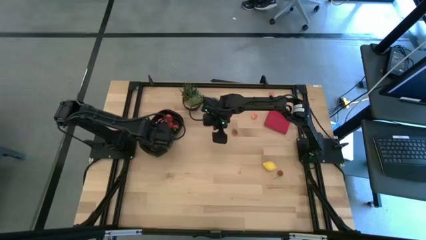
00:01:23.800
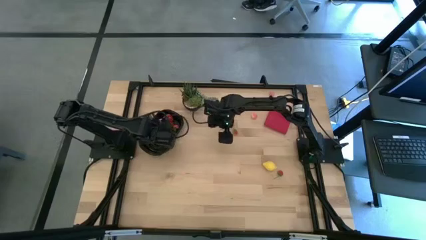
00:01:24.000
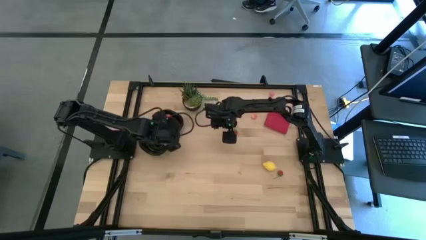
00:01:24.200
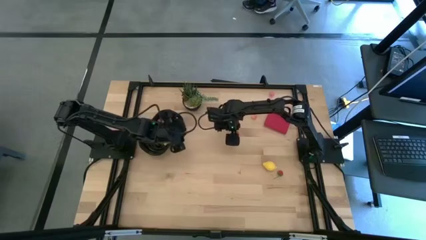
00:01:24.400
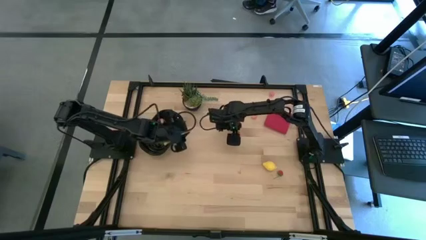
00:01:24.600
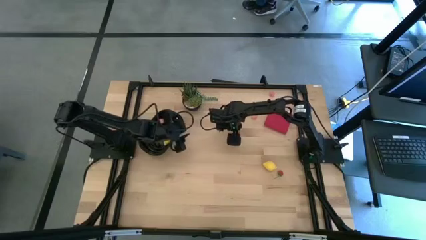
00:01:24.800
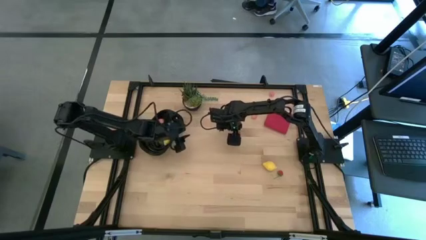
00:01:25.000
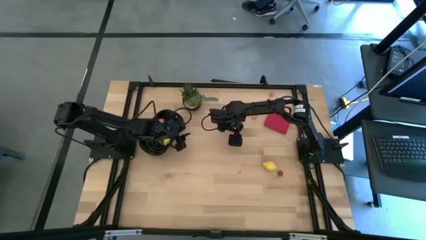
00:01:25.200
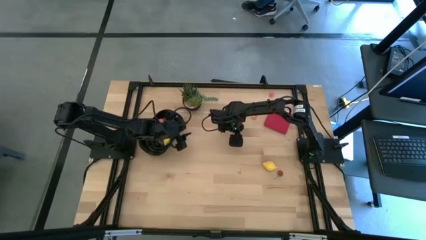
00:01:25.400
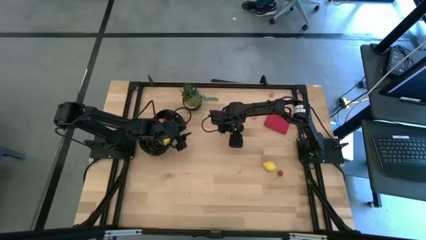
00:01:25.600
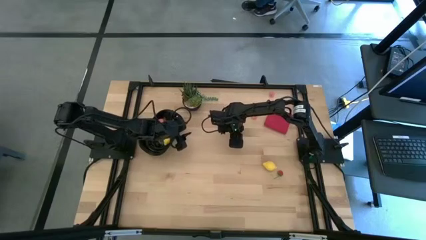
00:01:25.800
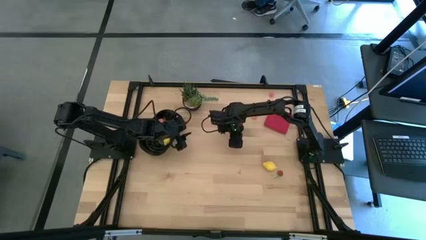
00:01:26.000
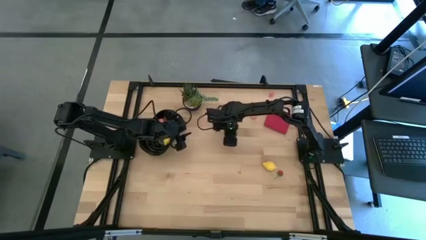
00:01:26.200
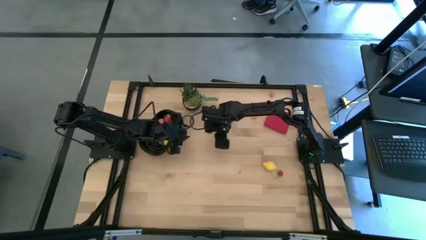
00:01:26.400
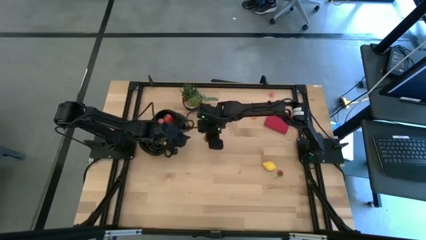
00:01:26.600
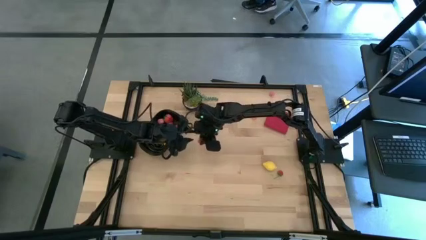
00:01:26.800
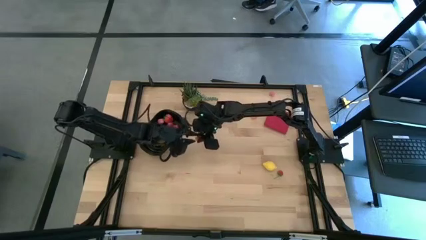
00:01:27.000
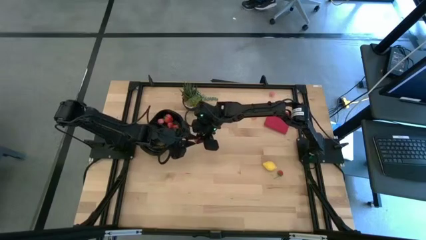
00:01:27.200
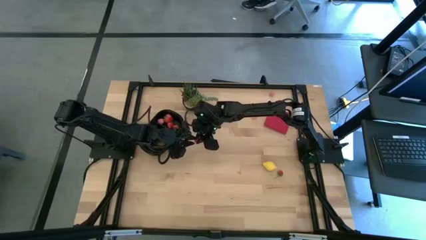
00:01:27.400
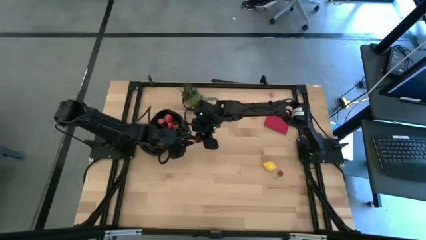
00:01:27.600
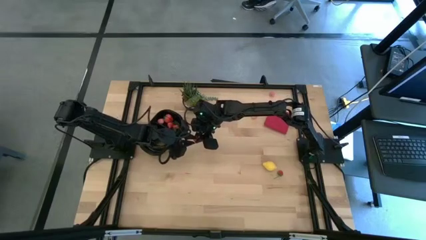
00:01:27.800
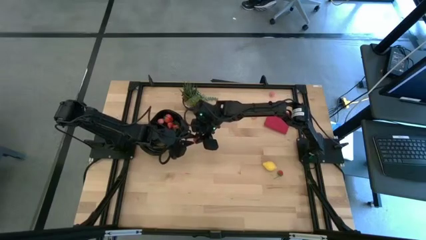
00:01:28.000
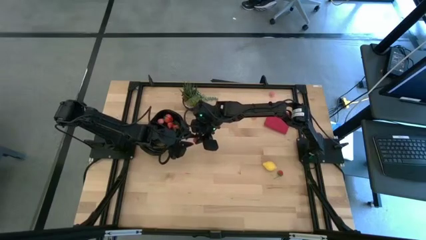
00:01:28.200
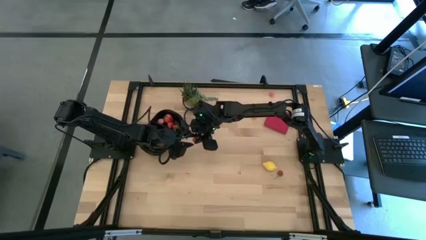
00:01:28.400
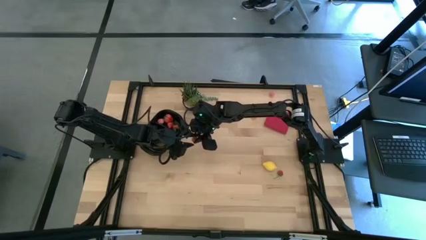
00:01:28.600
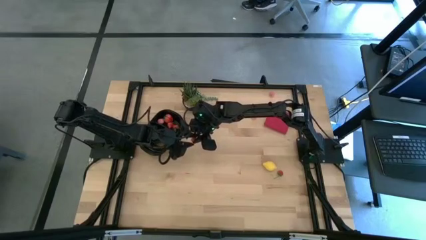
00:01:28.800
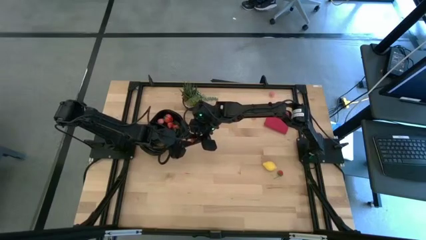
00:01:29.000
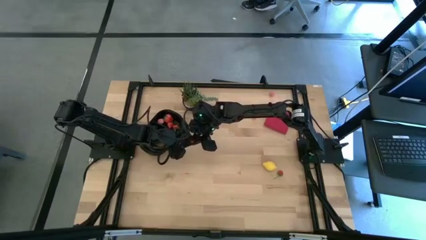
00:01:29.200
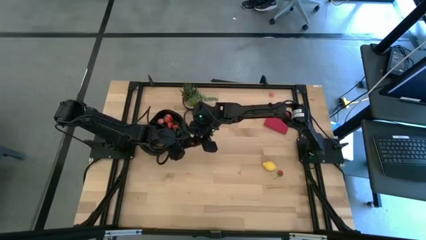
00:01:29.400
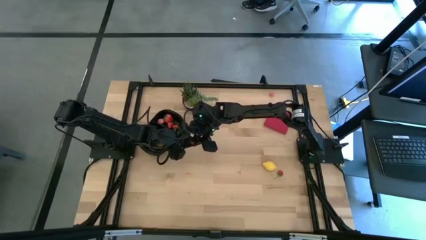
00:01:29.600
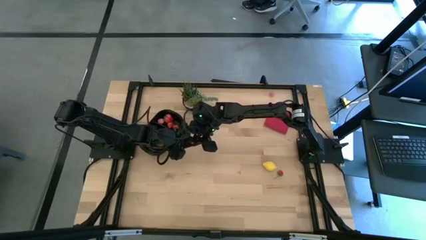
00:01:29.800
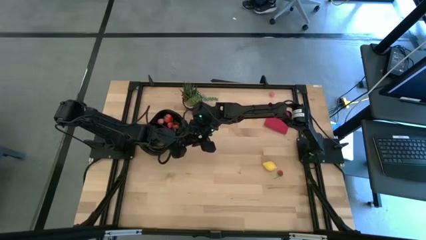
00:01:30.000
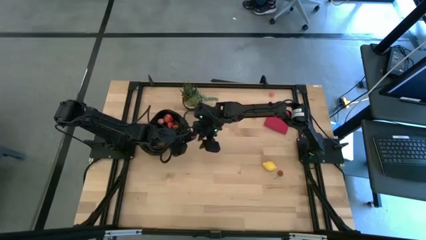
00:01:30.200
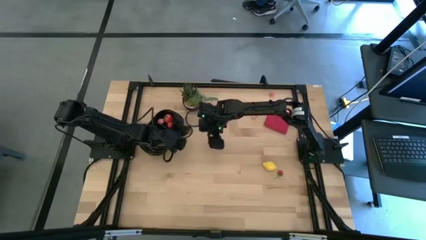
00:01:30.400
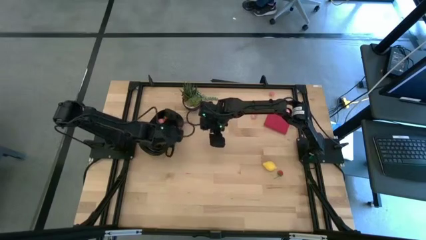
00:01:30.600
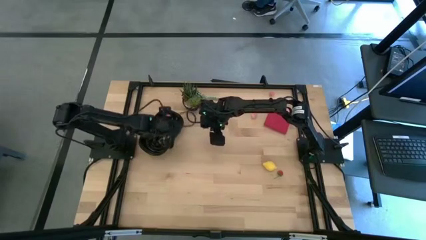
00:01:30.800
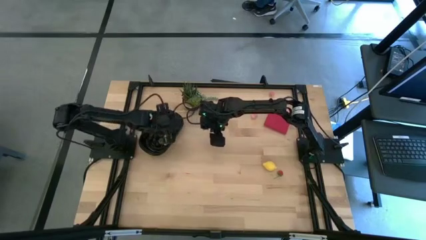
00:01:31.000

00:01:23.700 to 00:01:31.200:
Task: Pick and placing Produce into tupperware
Put the red strawberry into the black container
